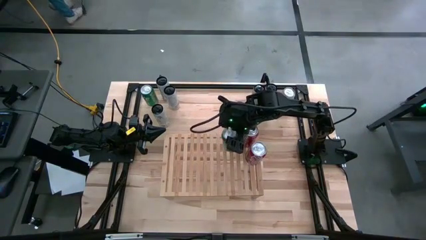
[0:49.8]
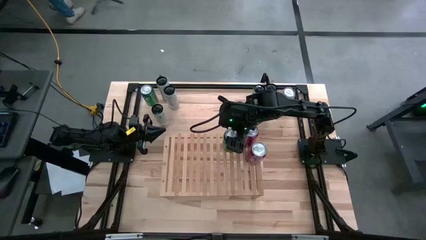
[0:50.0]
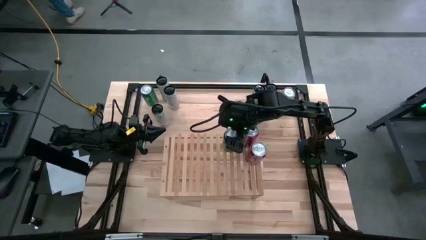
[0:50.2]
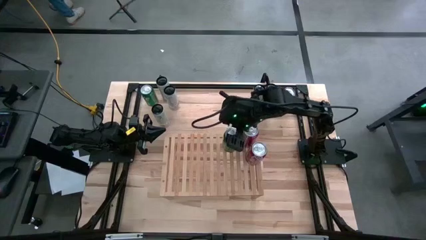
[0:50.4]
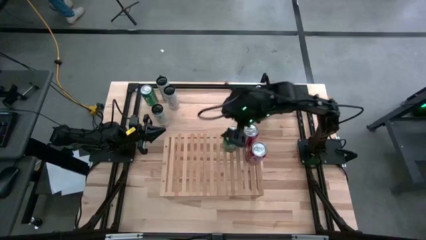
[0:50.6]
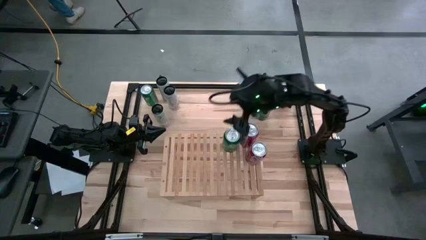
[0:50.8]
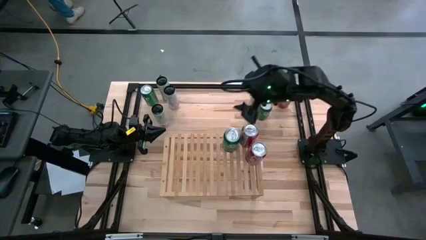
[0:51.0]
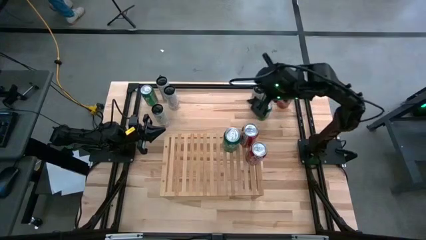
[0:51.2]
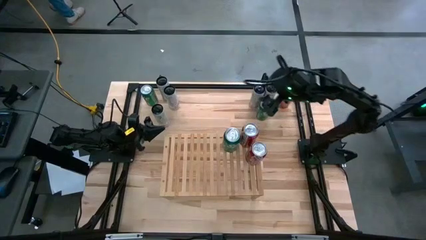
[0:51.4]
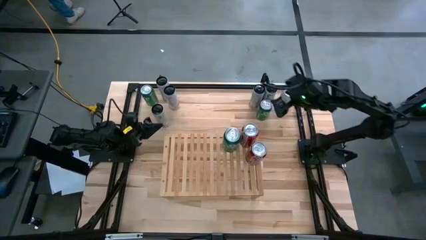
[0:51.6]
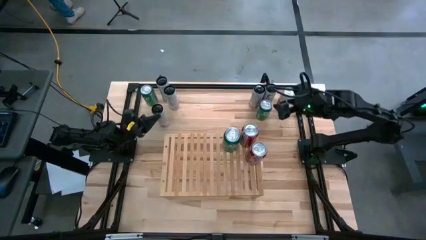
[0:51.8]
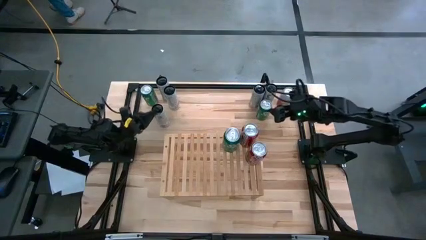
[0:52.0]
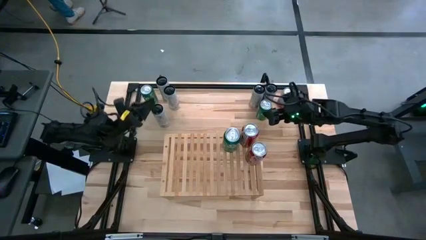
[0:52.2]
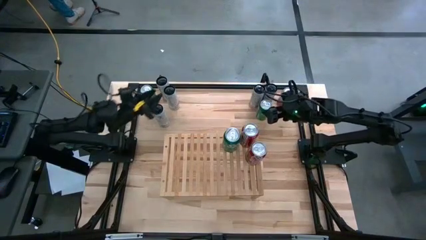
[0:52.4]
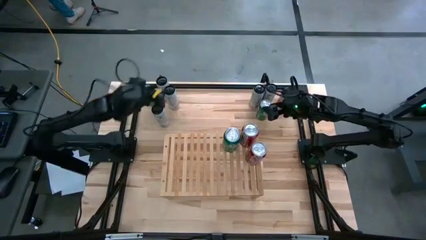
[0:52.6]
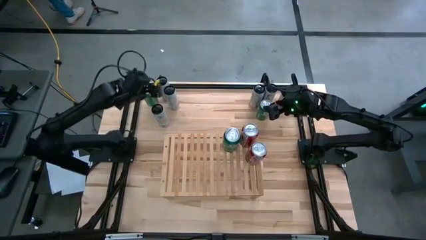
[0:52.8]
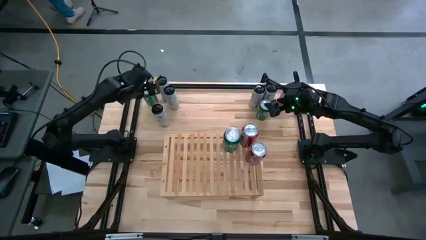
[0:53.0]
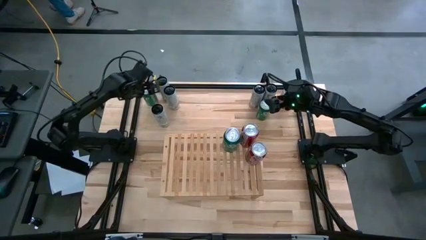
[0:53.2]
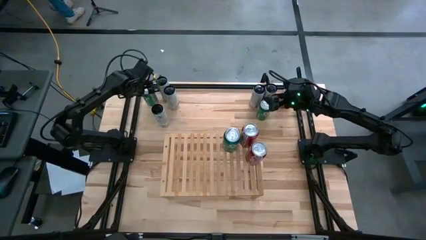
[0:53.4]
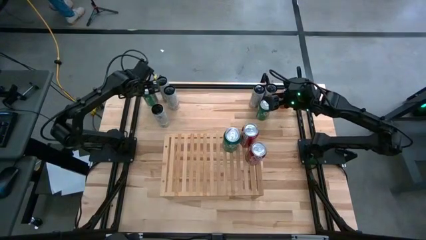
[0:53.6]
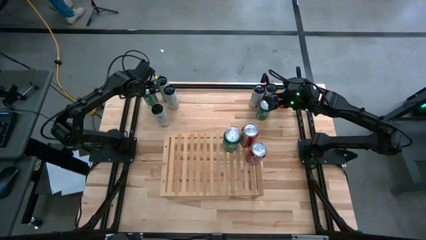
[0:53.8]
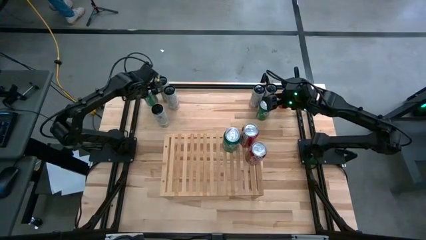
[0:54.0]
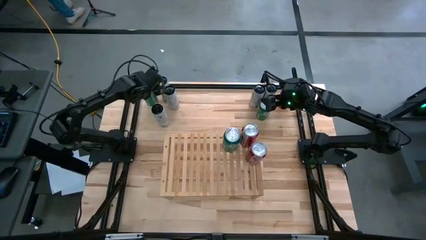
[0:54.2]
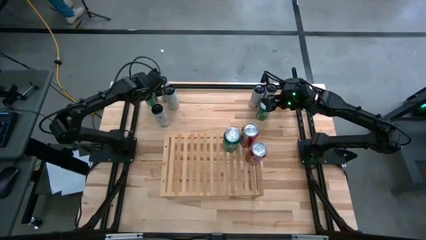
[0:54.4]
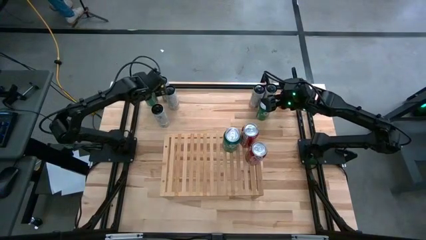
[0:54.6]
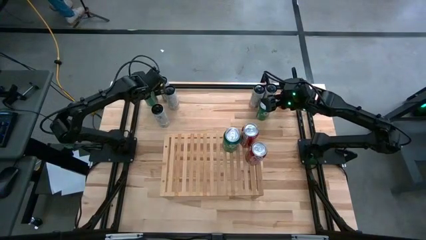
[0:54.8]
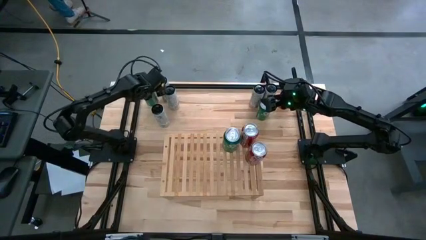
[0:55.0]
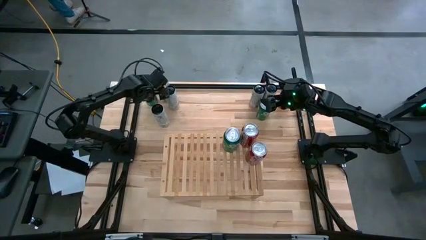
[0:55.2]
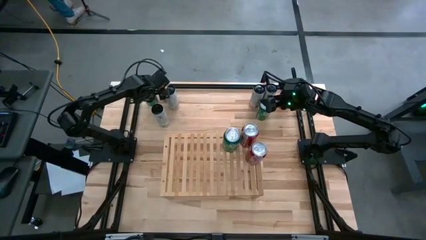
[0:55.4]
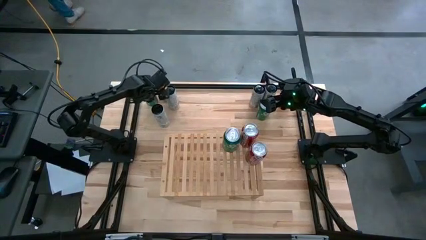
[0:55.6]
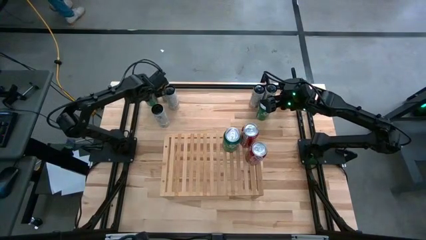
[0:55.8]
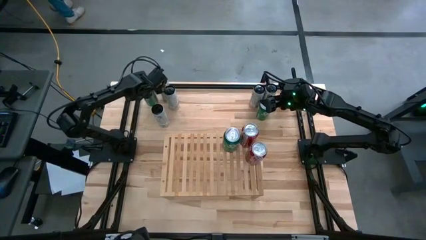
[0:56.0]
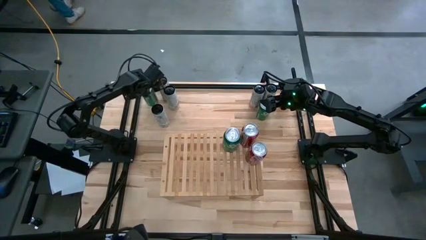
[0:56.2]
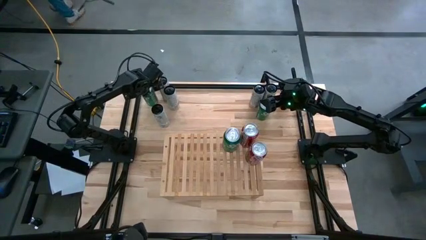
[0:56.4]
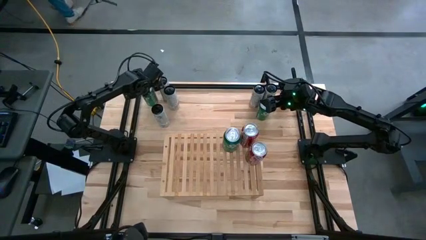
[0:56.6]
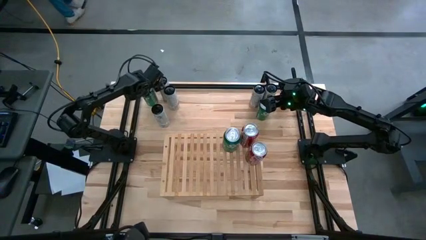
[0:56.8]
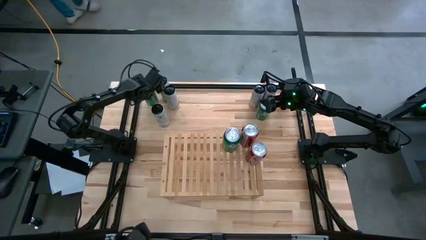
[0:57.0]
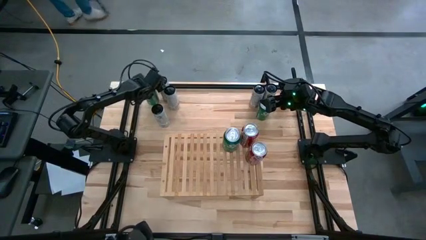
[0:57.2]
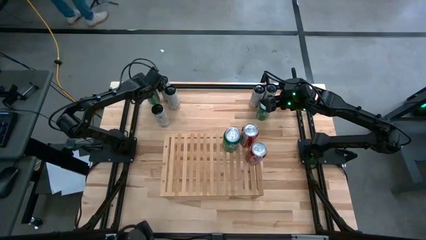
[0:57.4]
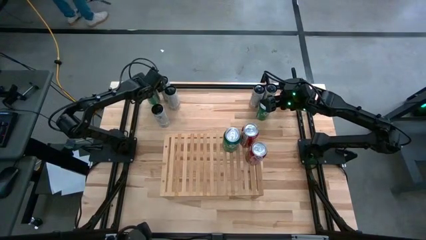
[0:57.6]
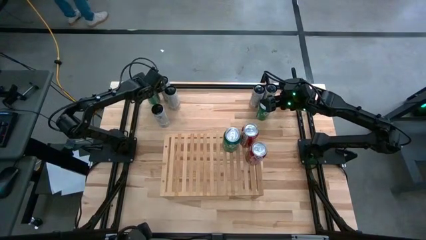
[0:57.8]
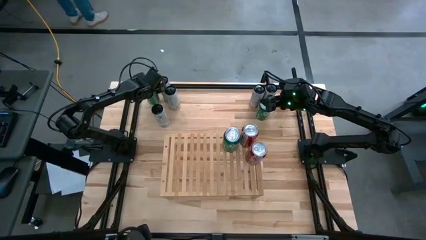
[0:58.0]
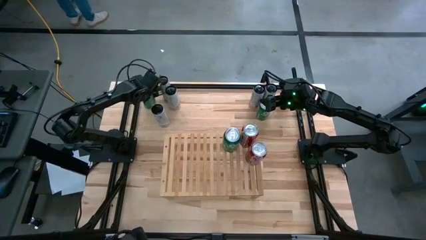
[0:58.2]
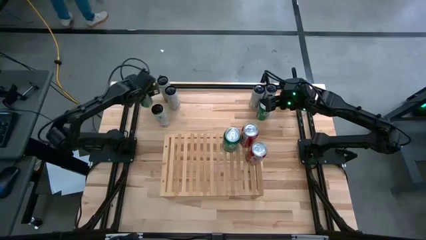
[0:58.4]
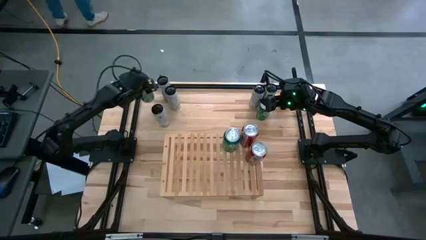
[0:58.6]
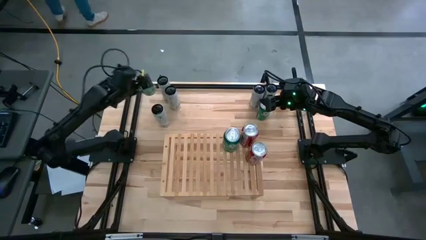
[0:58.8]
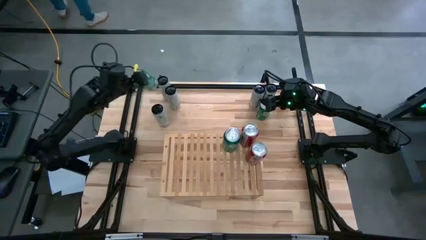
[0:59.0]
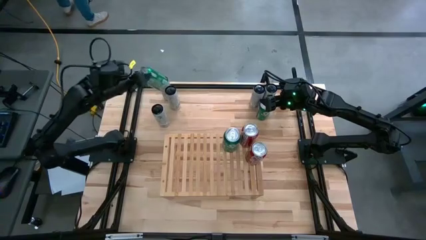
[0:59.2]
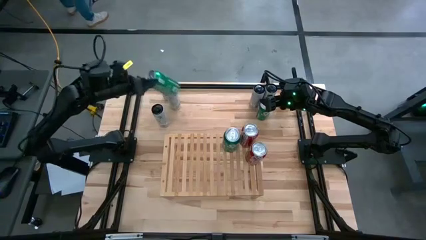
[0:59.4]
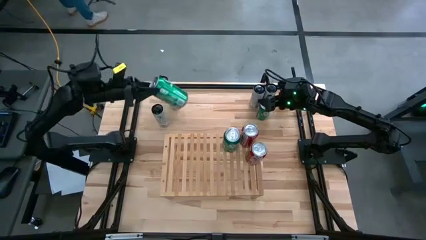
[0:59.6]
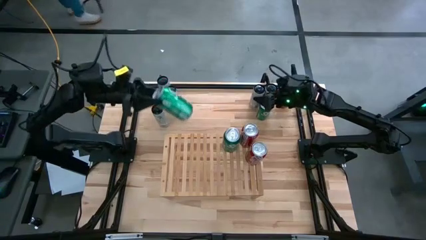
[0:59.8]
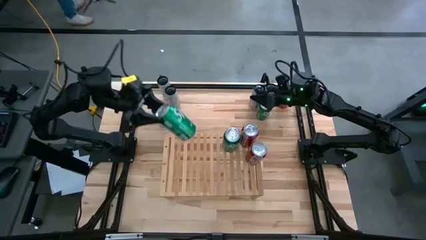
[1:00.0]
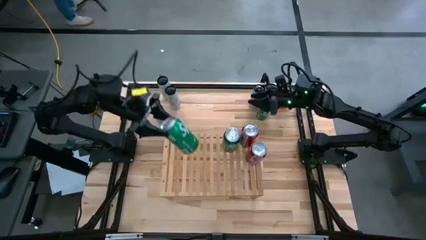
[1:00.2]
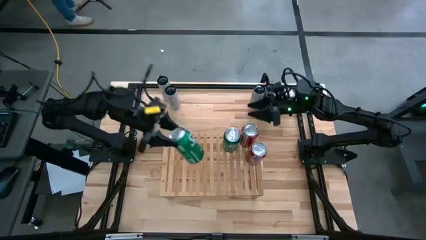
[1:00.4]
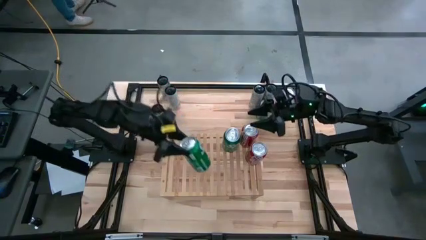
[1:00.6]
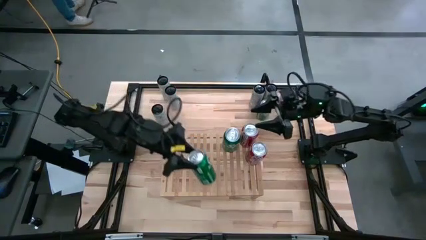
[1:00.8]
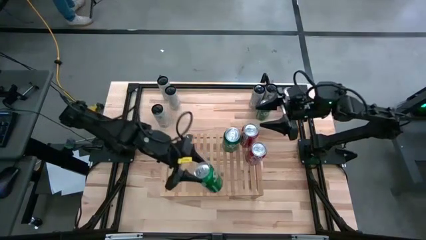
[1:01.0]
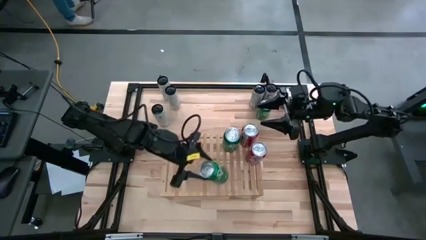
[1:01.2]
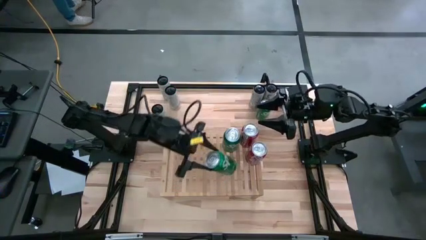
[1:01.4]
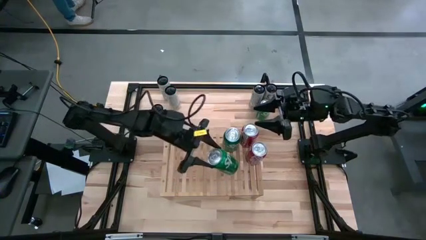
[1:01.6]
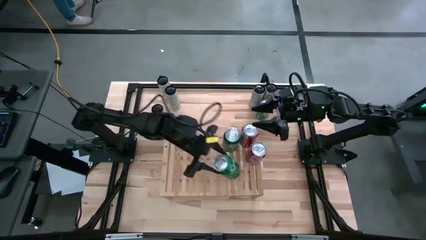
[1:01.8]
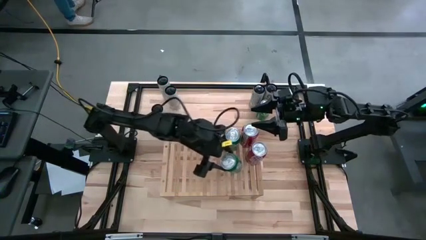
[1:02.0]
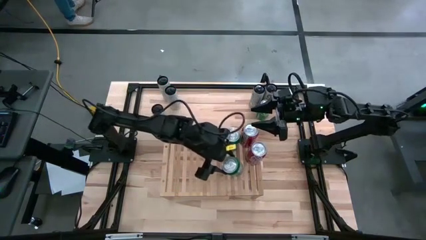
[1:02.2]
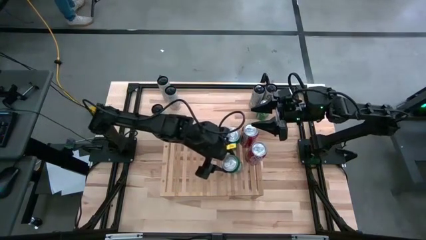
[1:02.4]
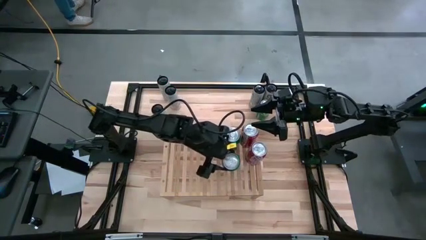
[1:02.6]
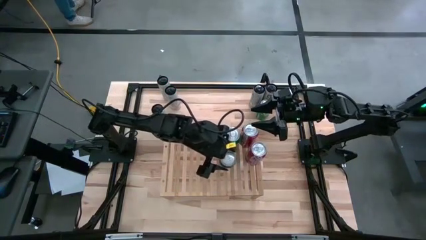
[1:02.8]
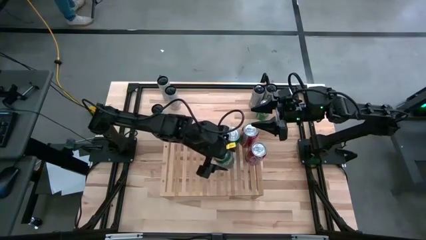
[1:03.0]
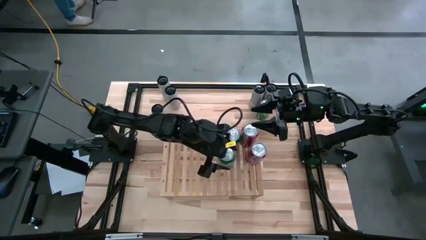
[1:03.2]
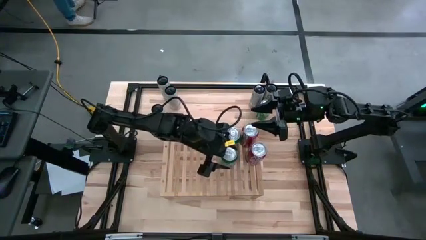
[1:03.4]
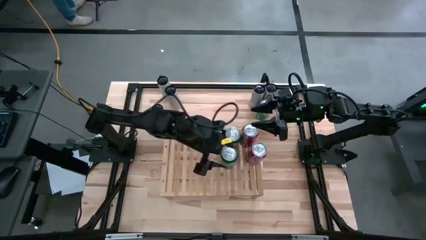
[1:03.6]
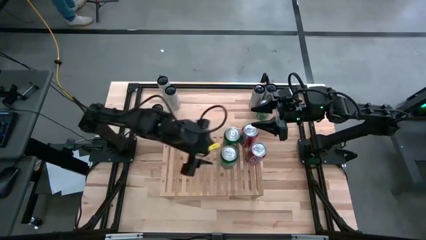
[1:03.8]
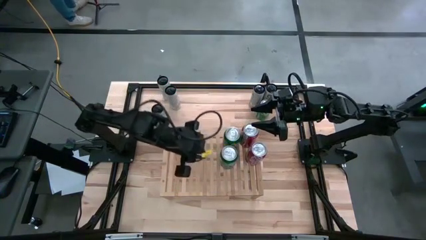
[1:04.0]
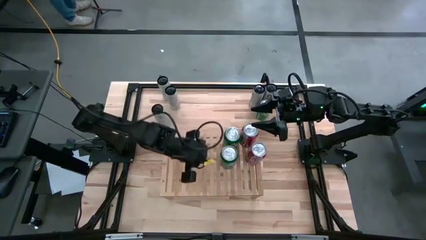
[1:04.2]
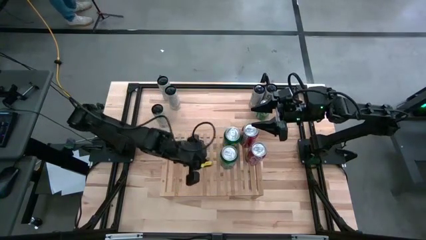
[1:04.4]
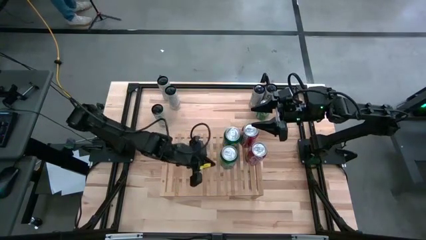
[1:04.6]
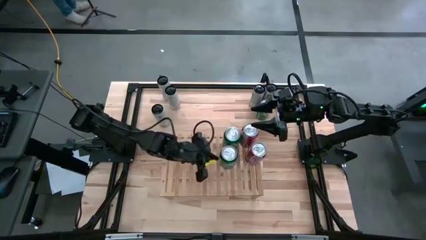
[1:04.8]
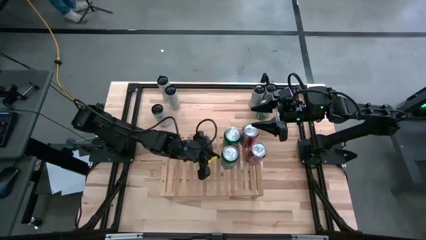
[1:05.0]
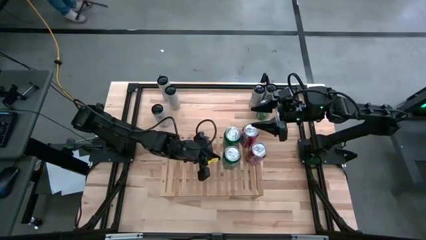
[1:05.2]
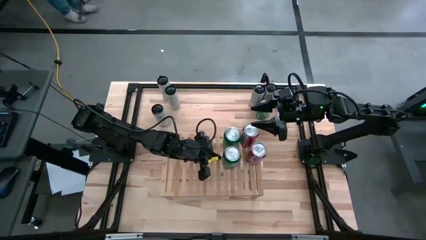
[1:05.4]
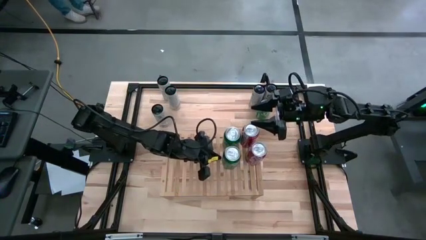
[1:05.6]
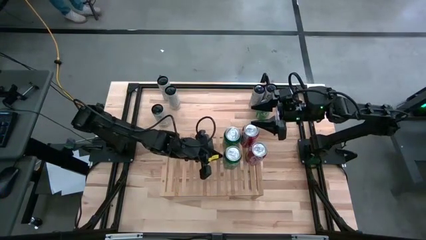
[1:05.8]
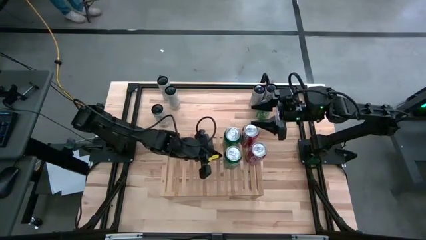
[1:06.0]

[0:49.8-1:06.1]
Task: Place canned beverage on shelf
Put the left green soda can on the shelf aligned with the other green soda can
